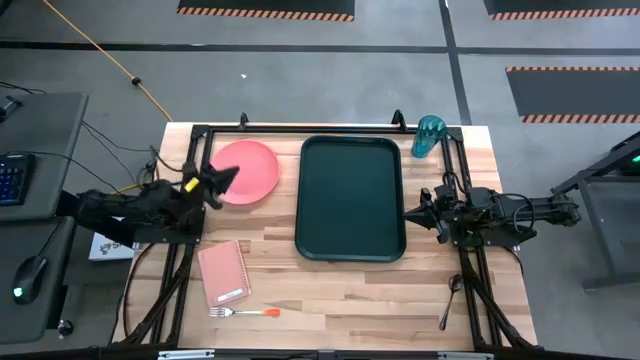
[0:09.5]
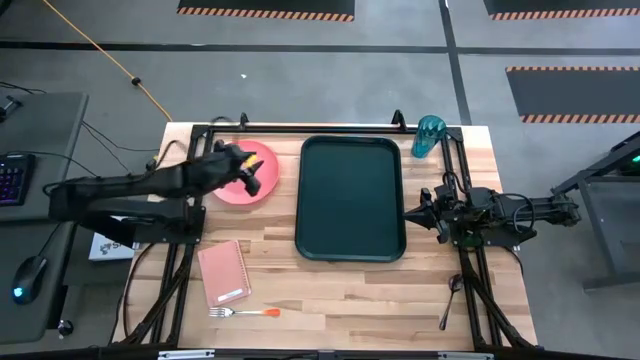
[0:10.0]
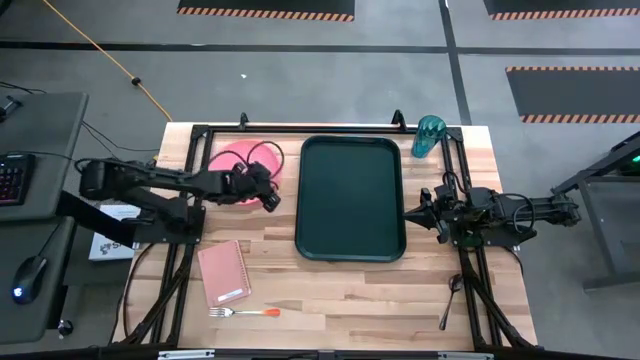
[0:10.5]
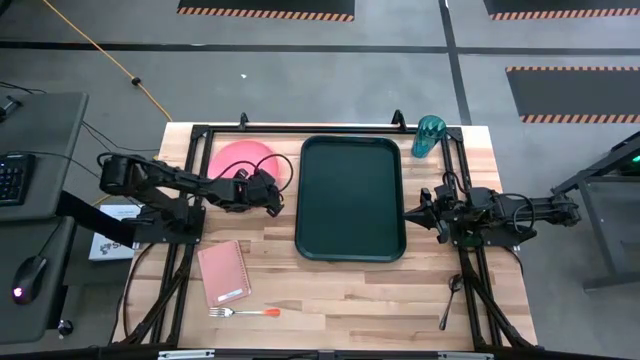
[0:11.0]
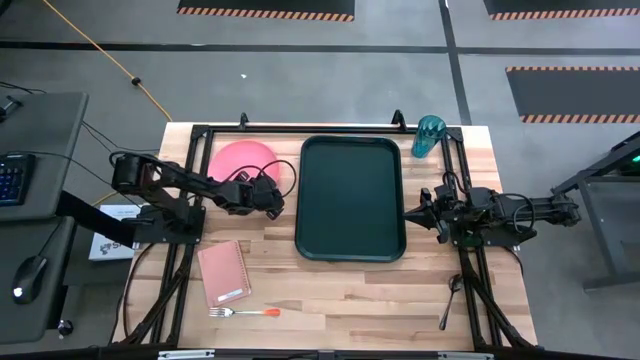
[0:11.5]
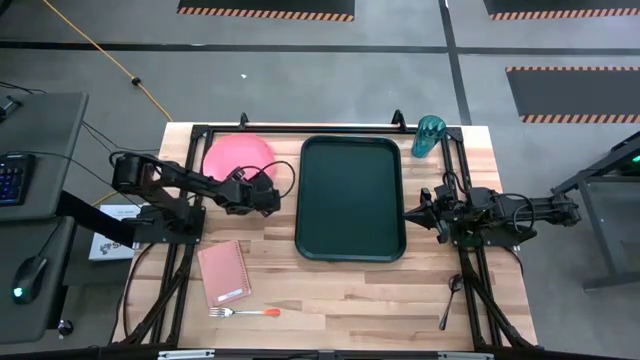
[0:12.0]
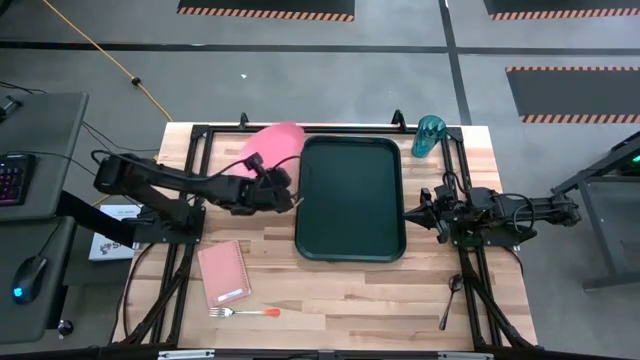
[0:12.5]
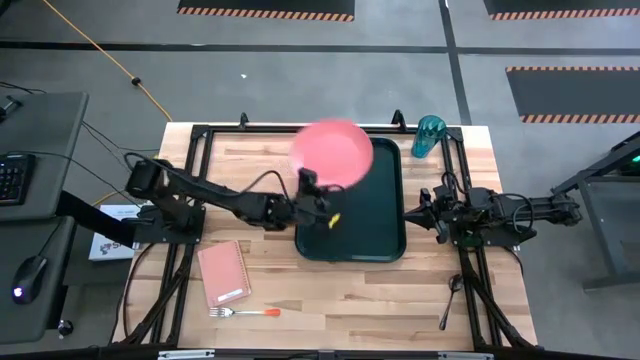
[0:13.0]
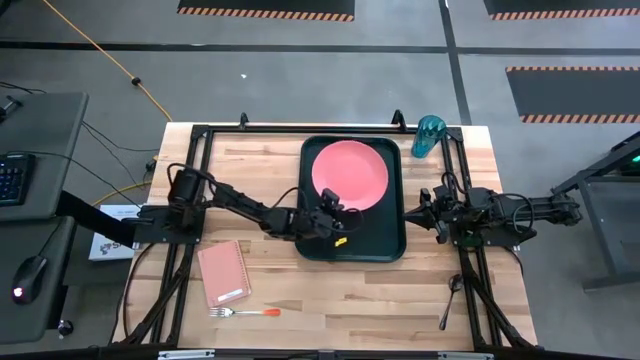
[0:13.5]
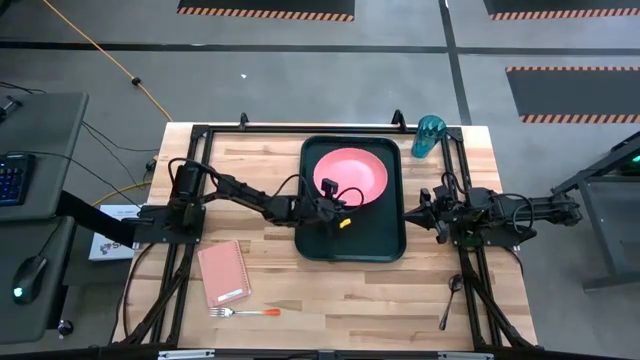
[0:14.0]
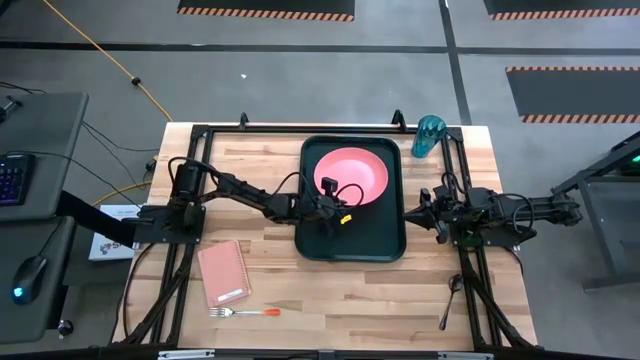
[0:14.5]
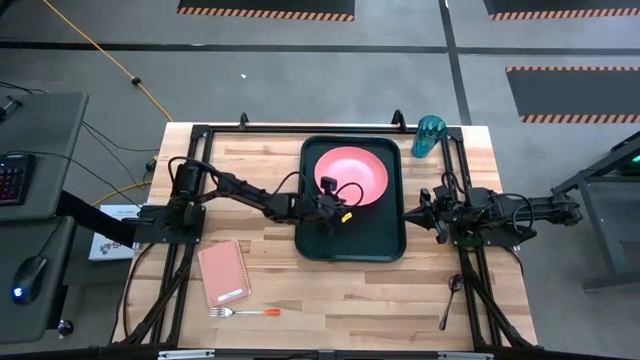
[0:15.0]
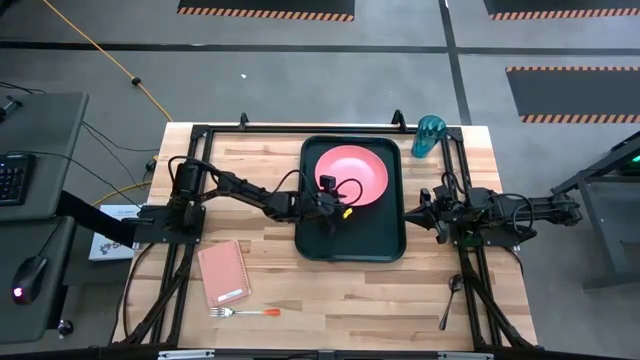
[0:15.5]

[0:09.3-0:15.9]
Task: Pick and place plate/cup/fork/spoon on tray
Put the pink plate on the black table tray

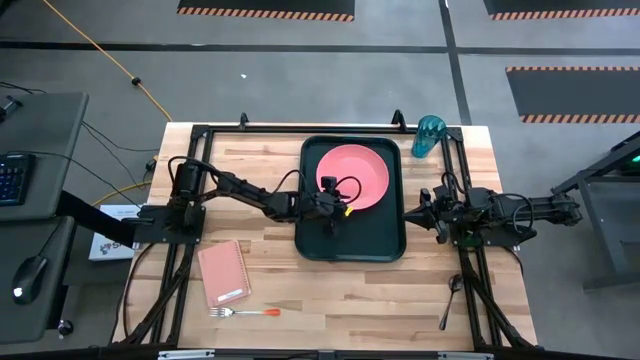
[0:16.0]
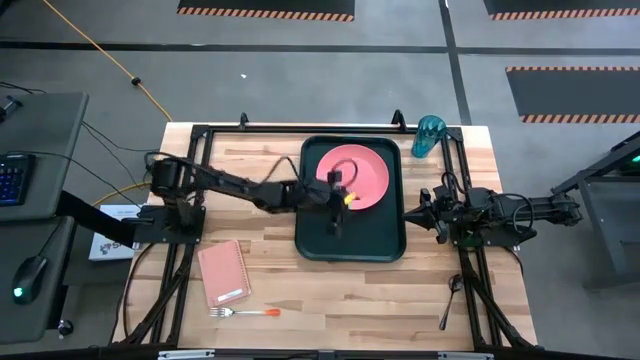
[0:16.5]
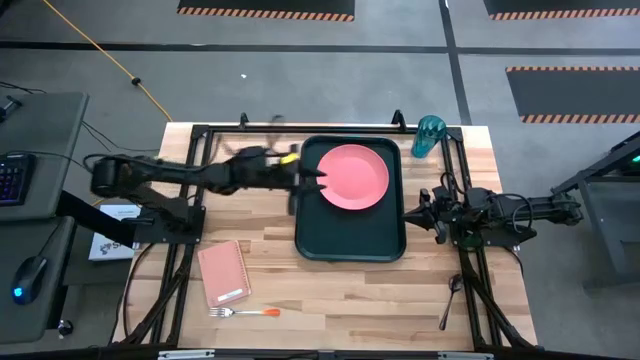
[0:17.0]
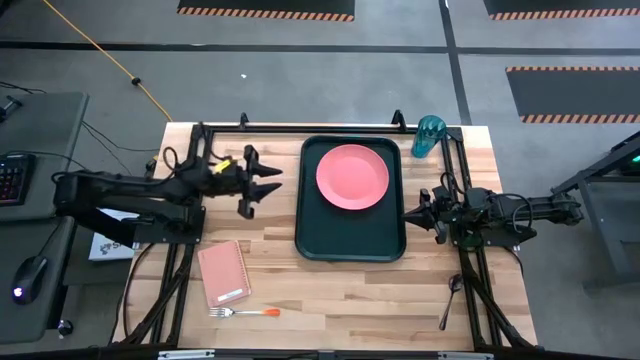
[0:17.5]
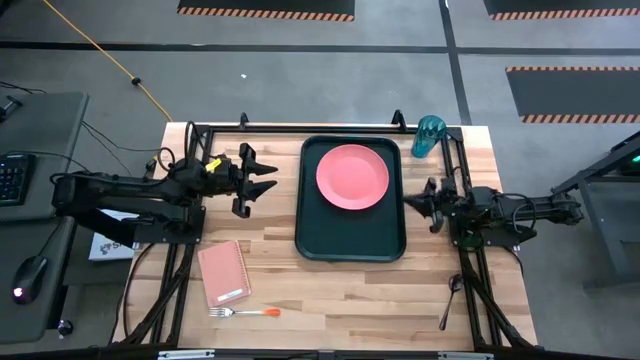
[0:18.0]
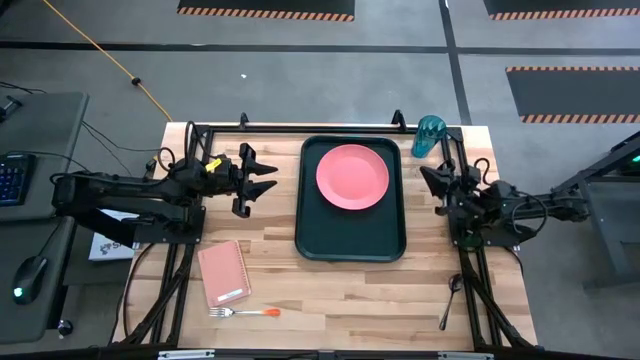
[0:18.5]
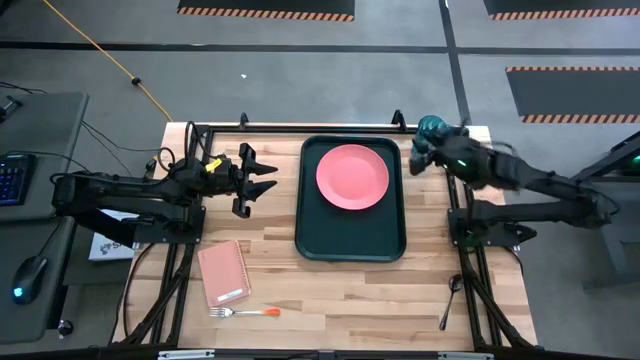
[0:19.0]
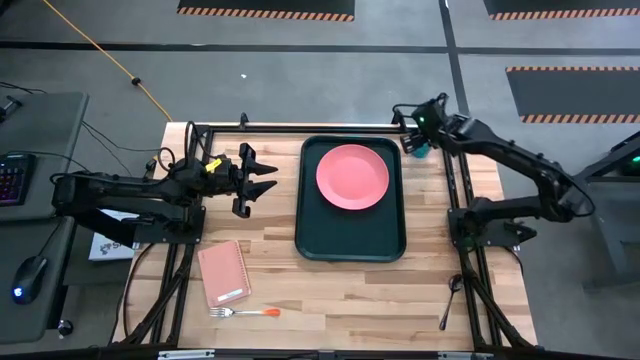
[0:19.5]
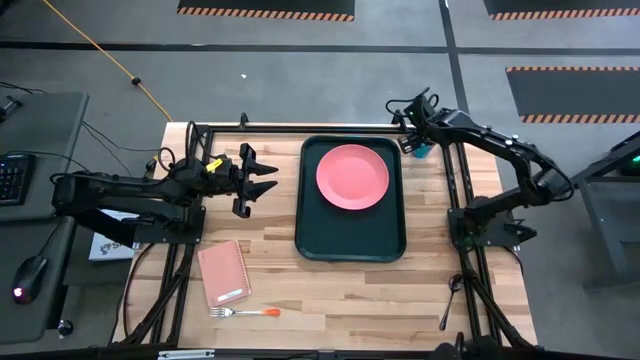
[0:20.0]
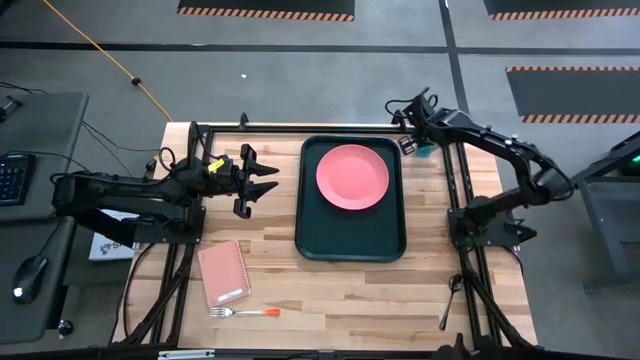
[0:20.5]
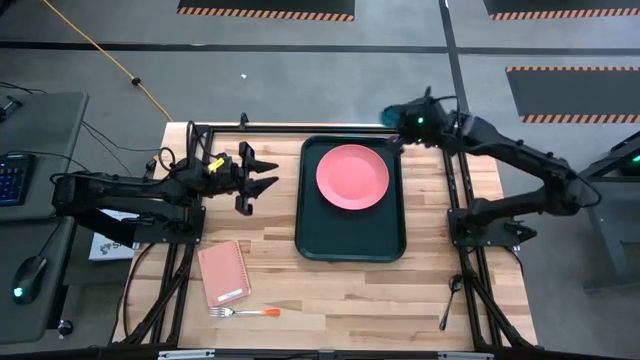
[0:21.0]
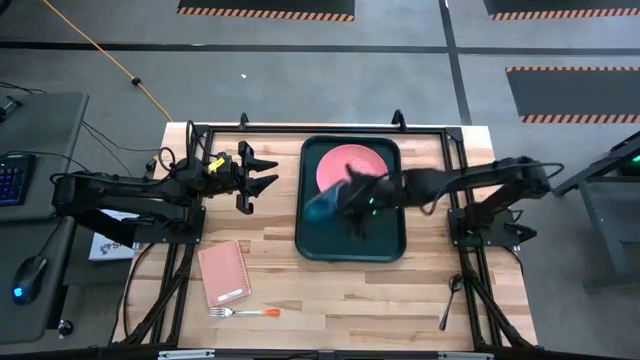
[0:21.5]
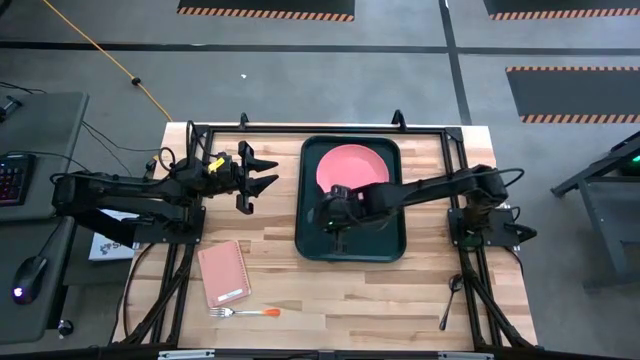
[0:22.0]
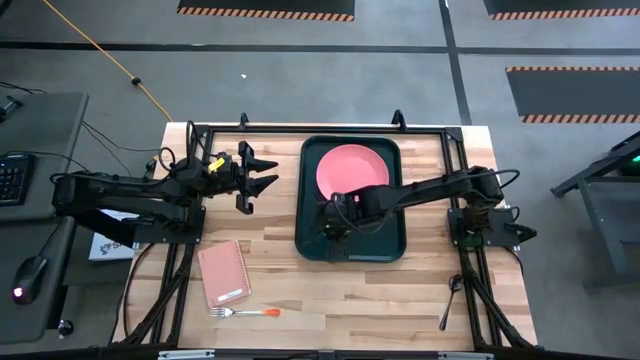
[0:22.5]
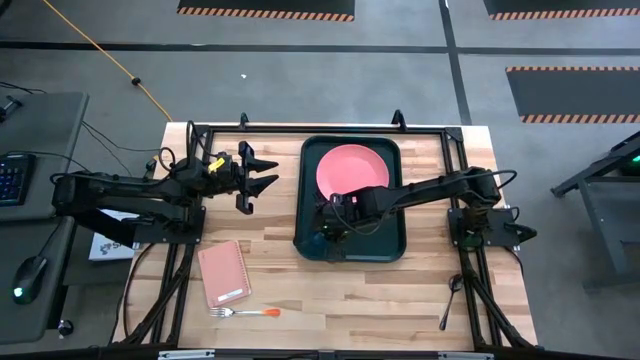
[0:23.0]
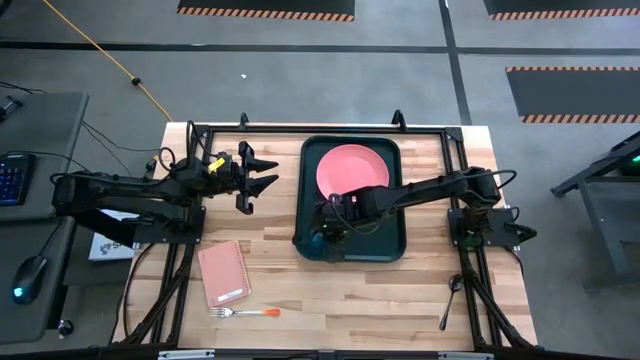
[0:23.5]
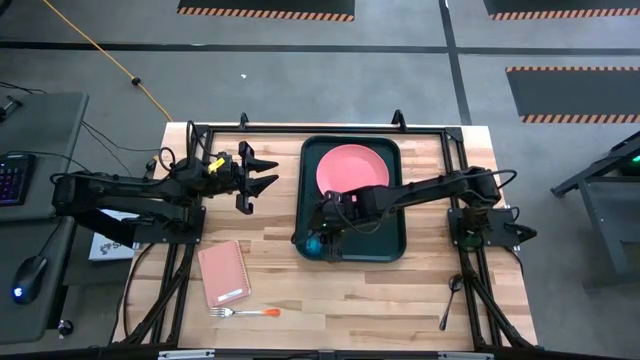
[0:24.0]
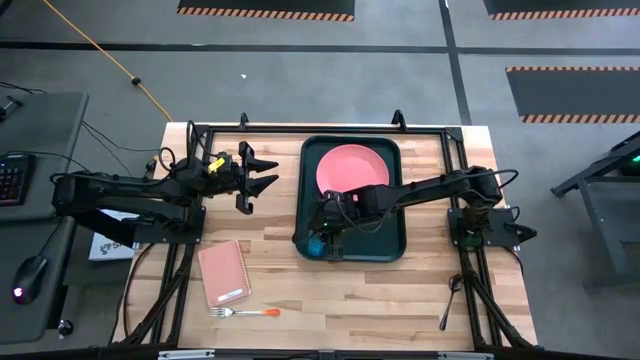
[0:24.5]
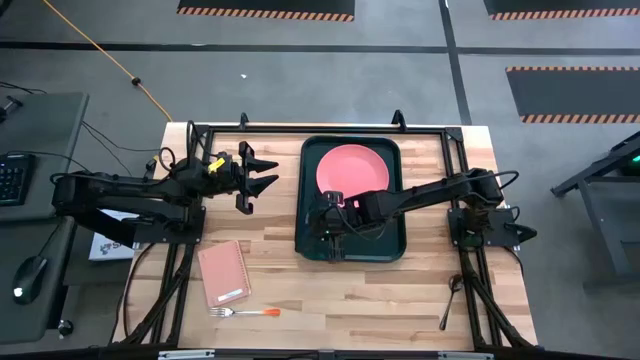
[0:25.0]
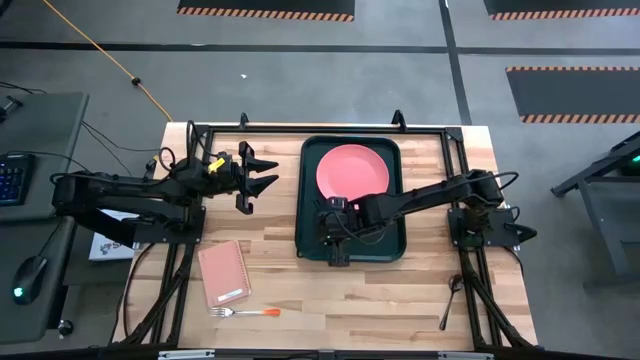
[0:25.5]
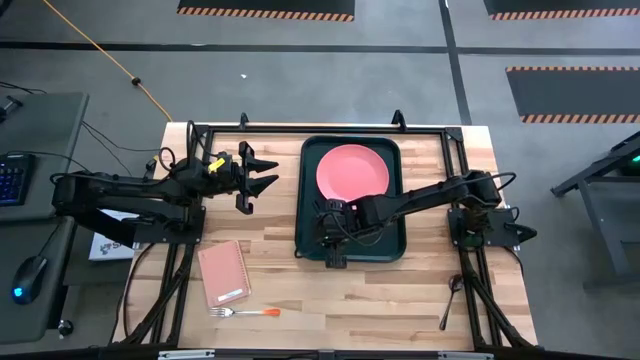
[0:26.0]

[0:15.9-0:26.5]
Put the glass on the black table tray to the bottom left of the pink plate

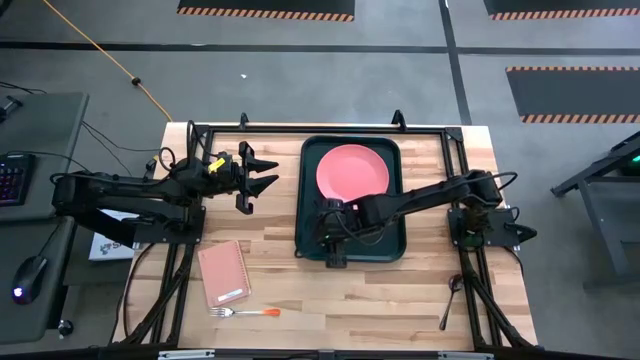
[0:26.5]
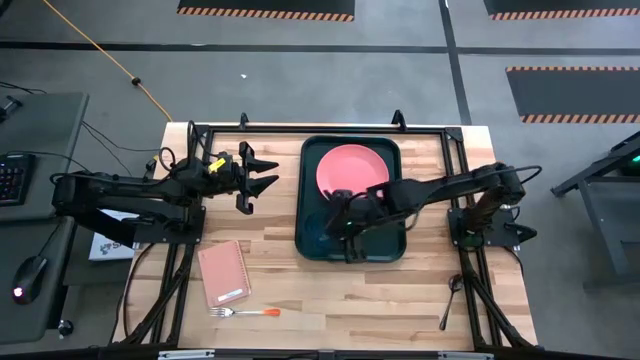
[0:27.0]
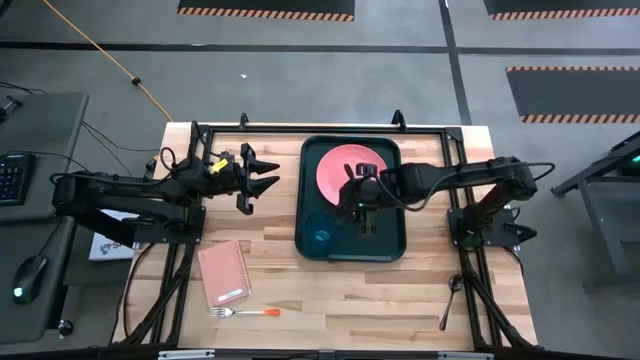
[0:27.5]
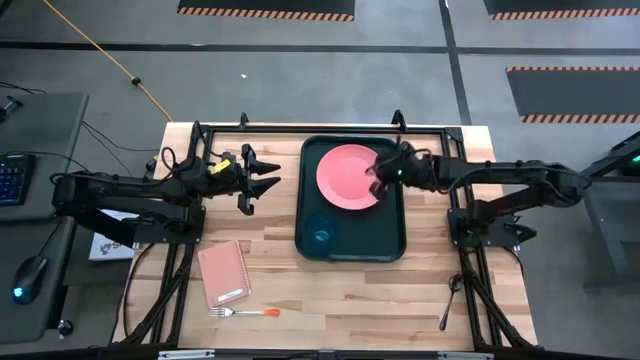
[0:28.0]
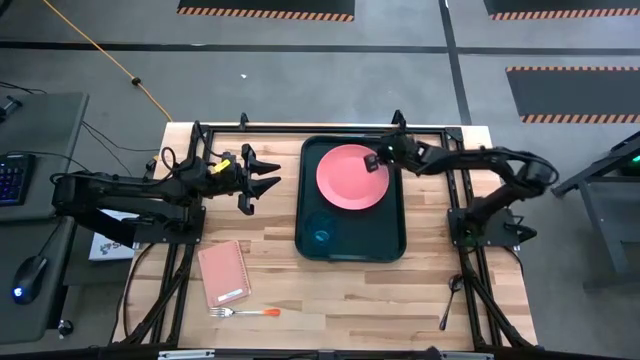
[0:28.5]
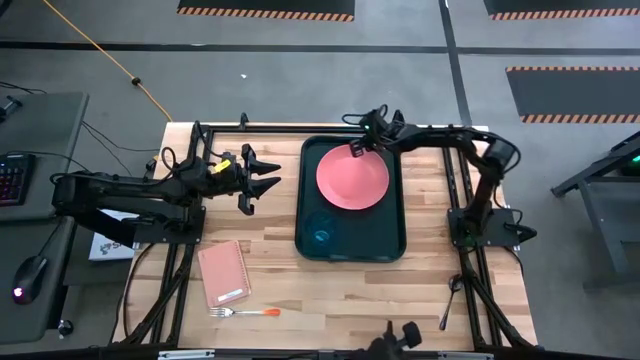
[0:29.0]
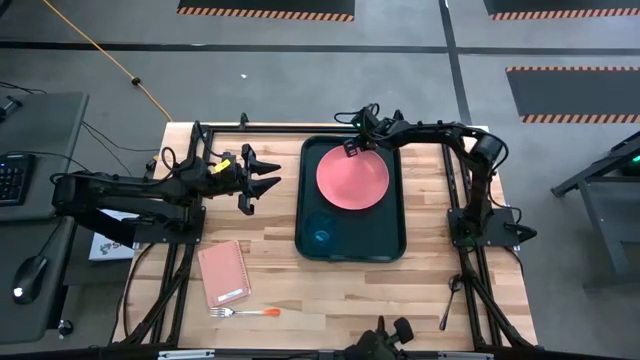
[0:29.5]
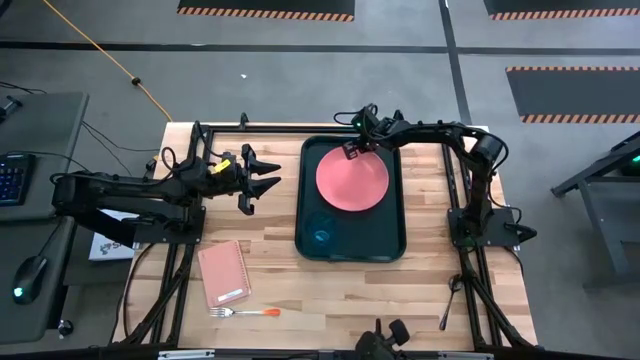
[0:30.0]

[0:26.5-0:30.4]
Adjust the pink plate on the black table tray
